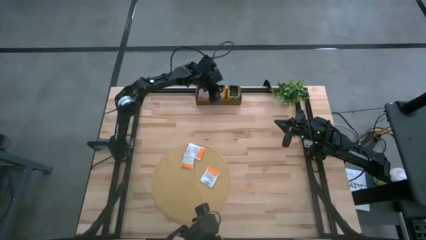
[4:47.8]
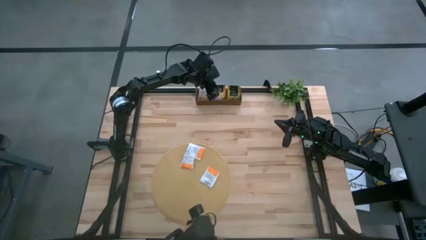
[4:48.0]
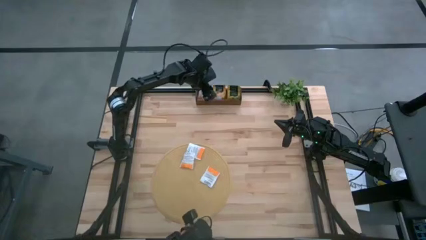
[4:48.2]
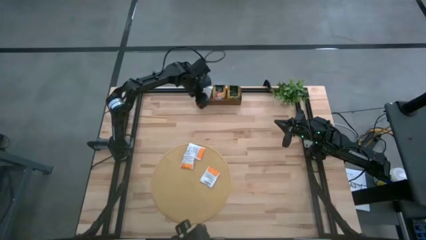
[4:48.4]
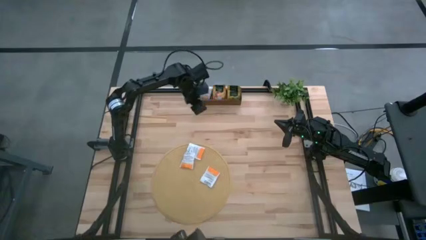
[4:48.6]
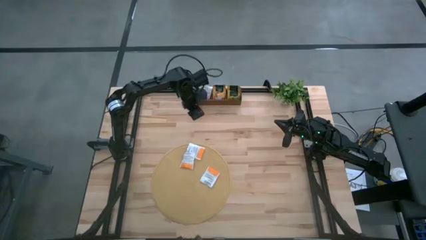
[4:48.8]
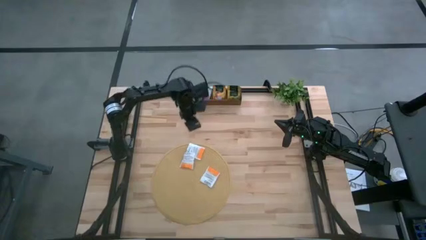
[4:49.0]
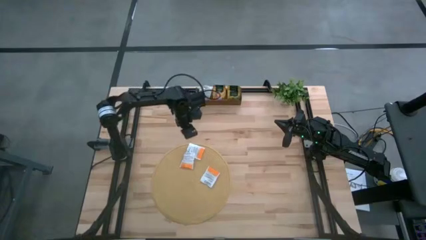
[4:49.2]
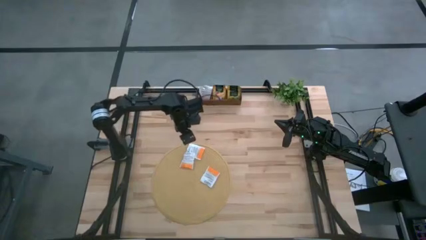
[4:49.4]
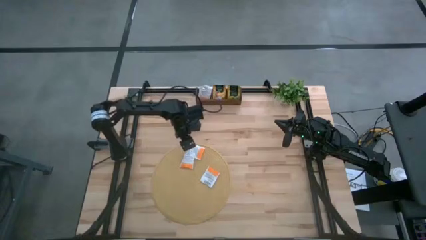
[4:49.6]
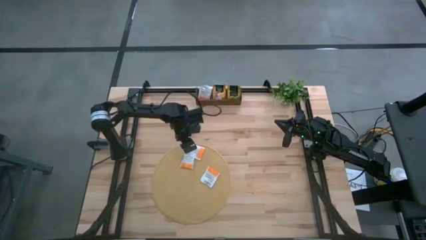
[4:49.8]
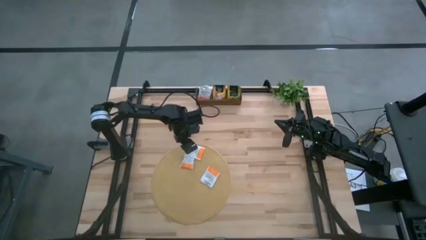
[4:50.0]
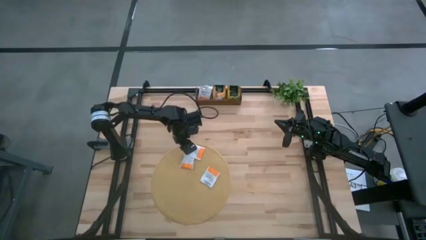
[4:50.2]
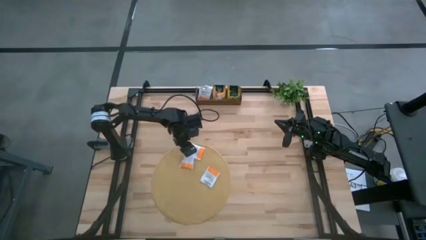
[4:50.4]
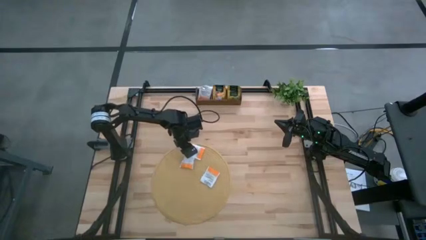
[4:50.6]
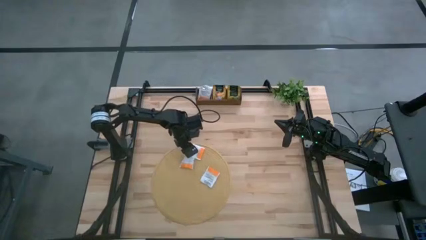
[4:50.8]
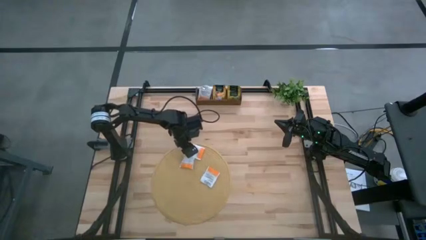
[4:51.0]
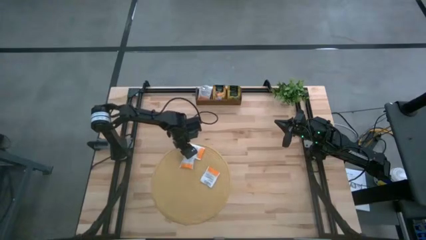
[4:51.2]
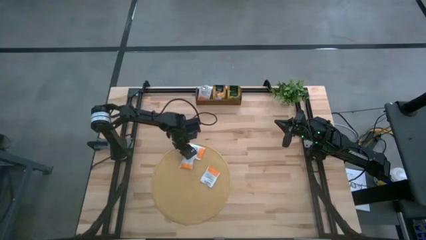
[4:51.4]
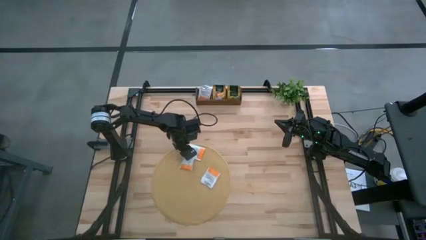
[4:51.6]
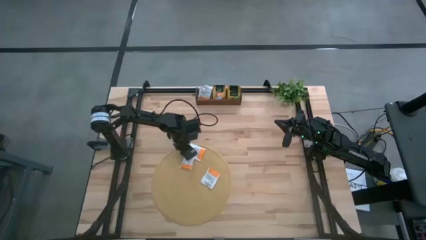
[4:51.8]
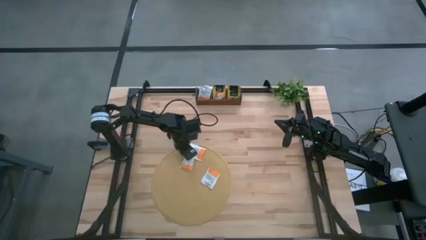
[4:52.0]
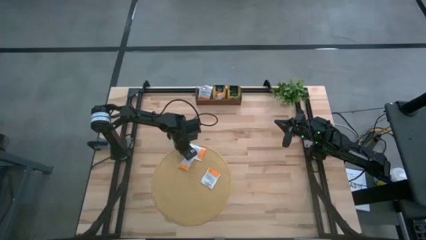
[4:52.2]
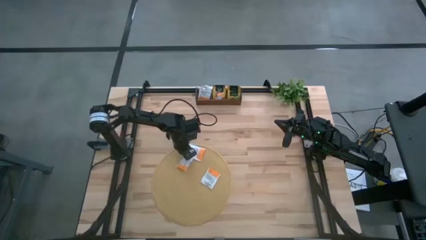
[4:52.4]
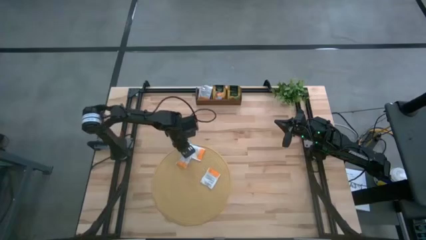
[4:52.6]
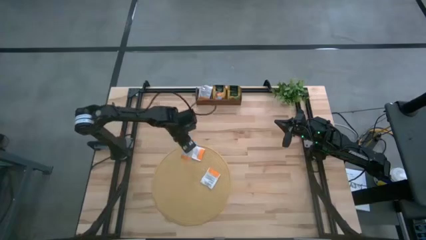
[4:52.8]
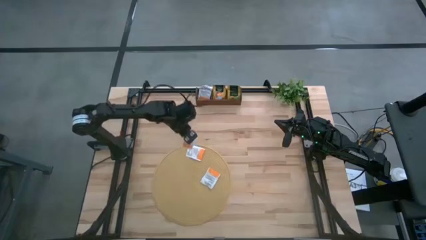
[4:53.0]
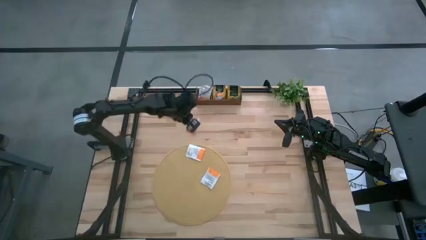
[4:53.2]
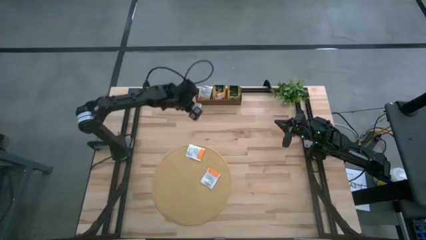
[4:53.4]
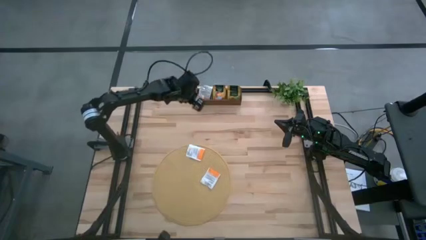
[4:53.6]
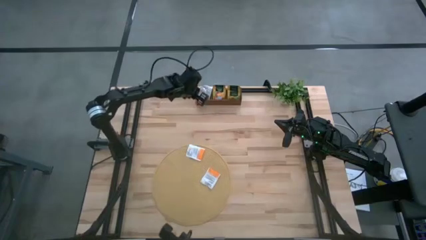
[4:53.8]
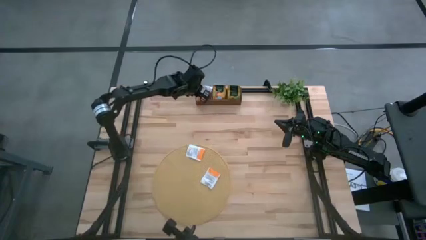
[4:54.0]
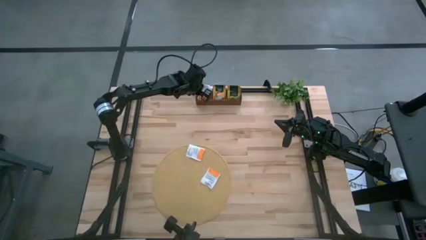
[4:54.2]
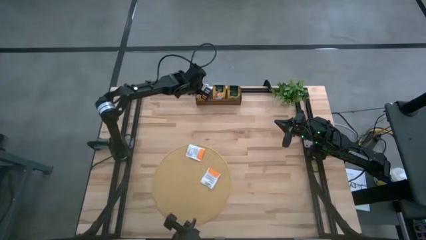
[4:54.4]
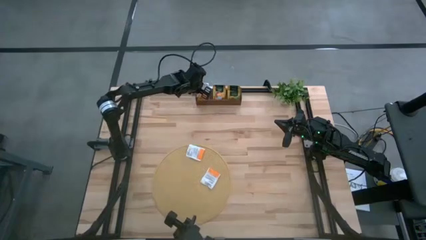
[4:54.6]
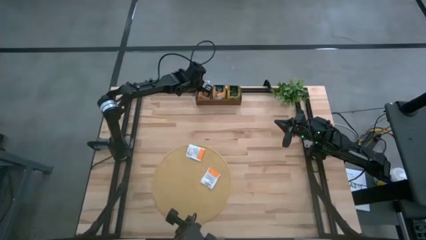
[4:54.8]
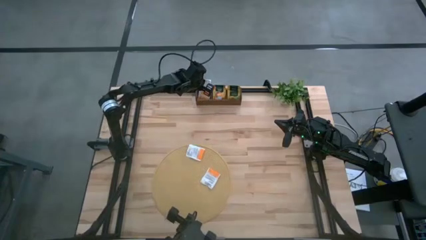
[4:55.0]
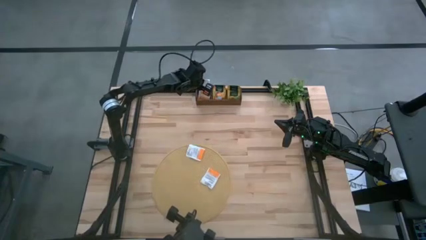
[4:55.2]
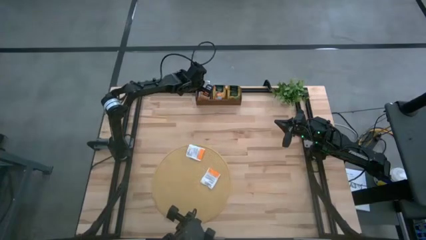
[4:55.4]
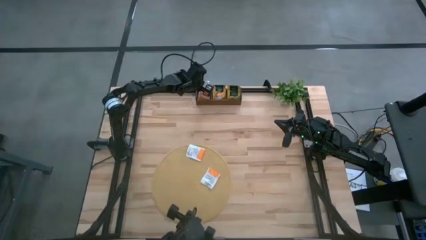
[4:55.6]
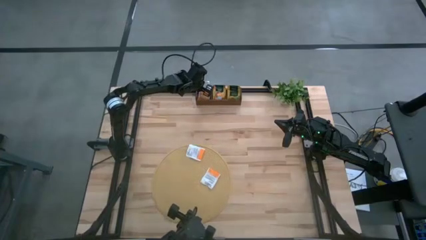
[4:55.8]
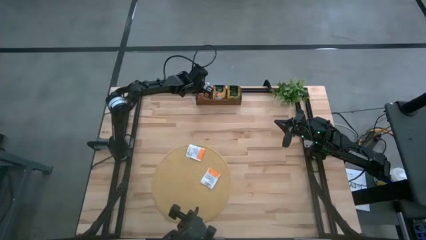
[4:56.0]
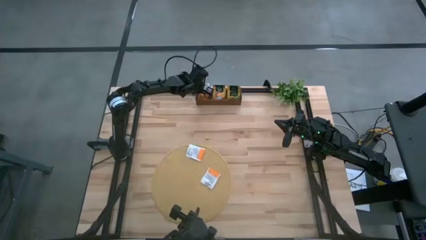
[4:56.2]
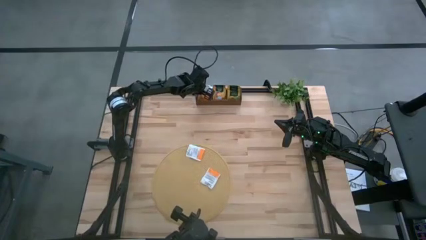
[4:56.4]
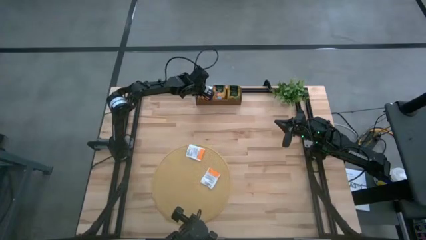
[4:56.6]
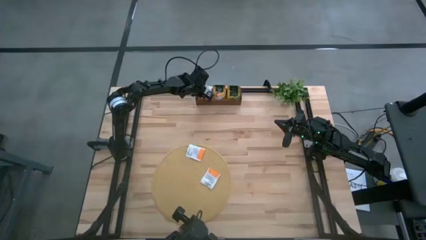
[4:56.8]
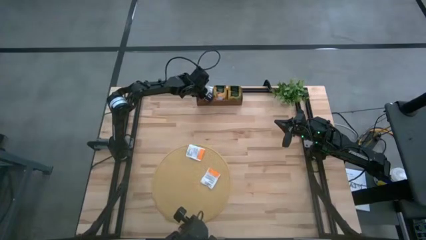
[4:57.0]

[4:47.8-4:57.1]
Task: Pick & Place Tea
Put the left white tea bag into the left slot of the wooden organizer

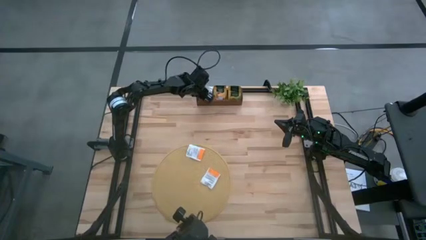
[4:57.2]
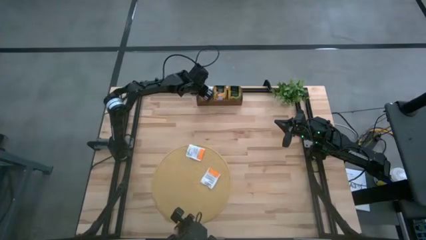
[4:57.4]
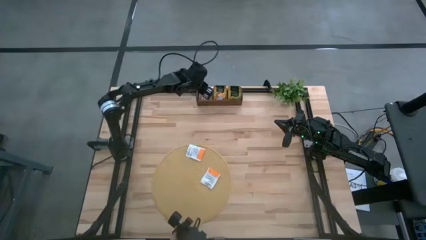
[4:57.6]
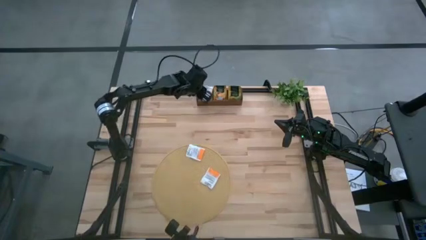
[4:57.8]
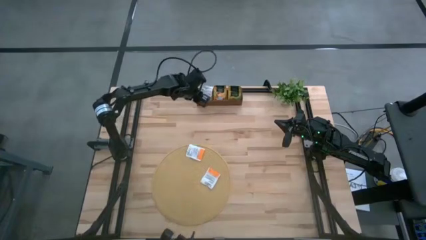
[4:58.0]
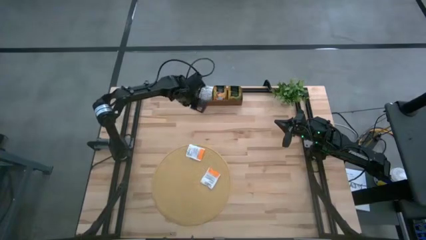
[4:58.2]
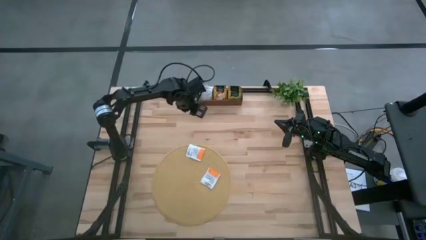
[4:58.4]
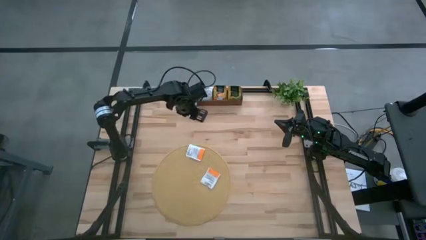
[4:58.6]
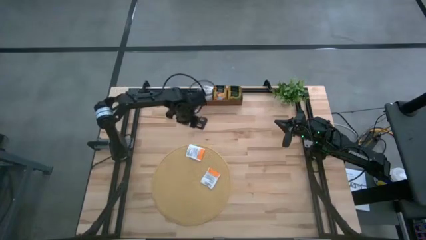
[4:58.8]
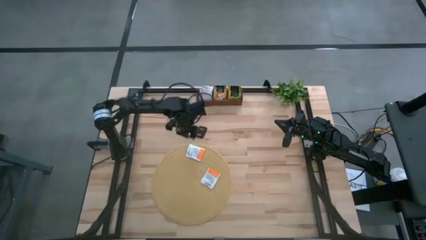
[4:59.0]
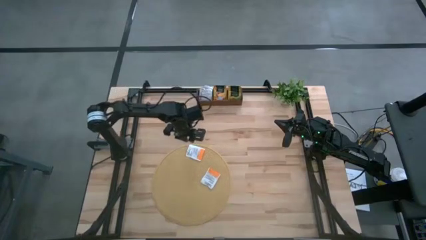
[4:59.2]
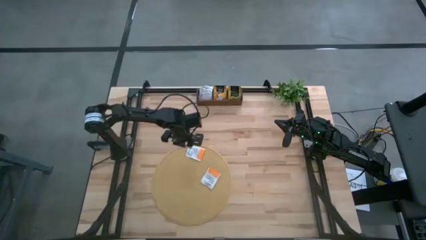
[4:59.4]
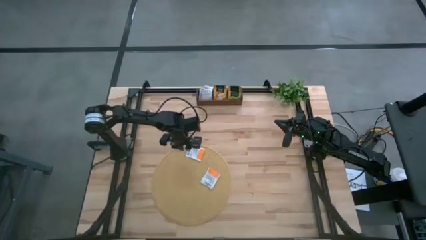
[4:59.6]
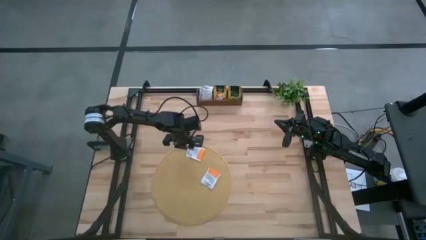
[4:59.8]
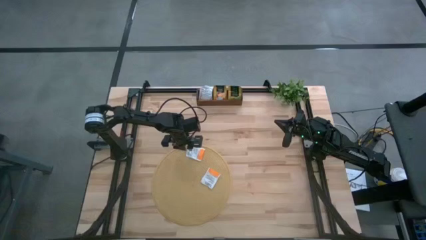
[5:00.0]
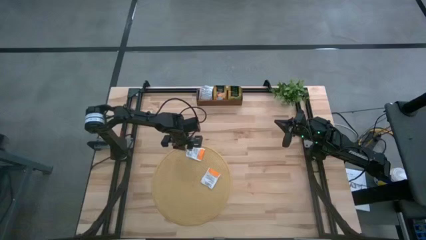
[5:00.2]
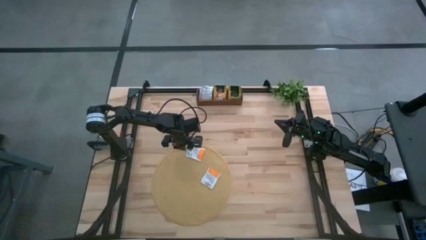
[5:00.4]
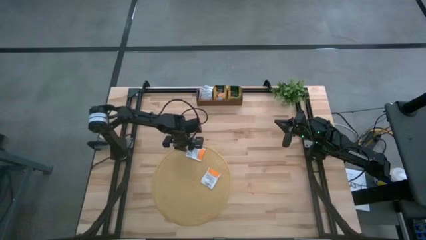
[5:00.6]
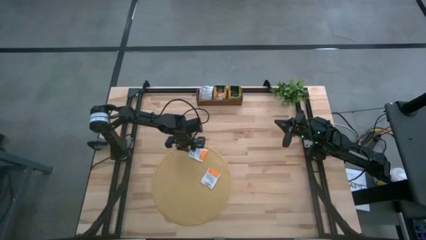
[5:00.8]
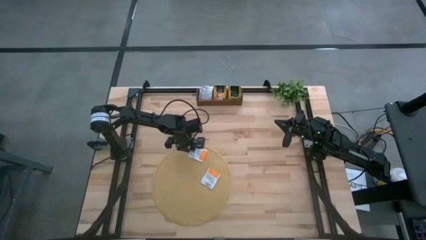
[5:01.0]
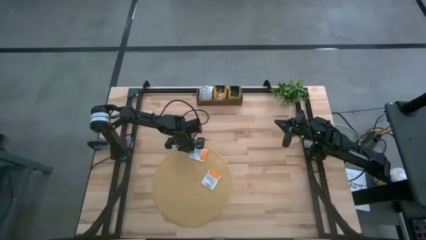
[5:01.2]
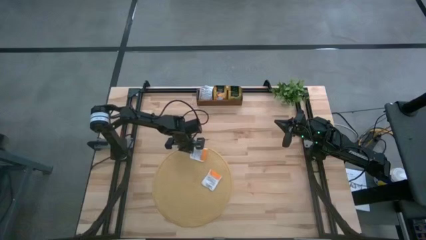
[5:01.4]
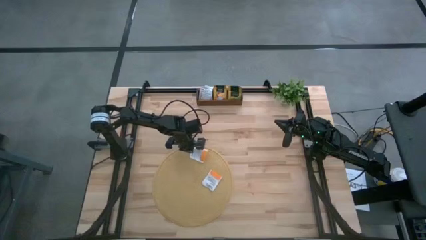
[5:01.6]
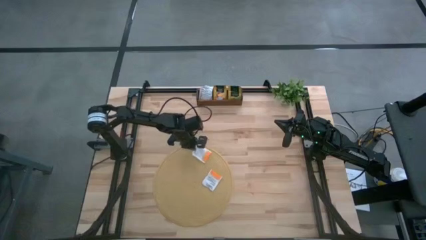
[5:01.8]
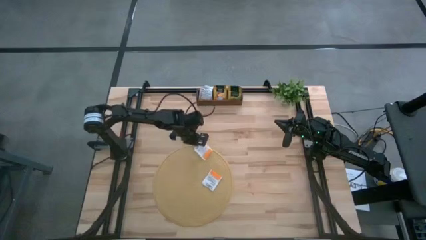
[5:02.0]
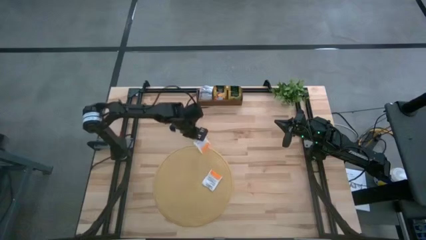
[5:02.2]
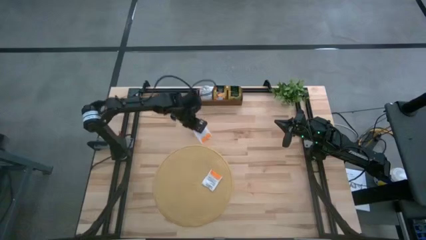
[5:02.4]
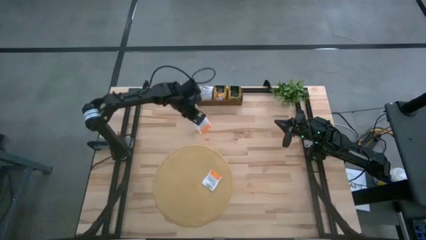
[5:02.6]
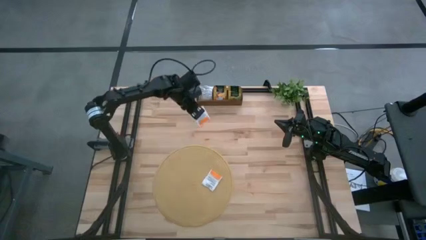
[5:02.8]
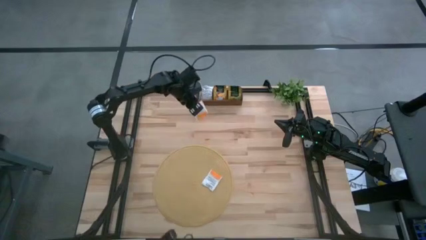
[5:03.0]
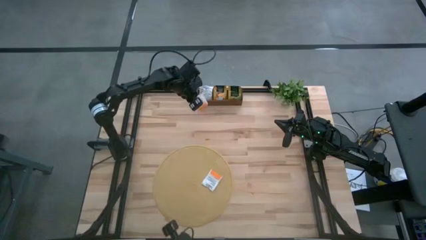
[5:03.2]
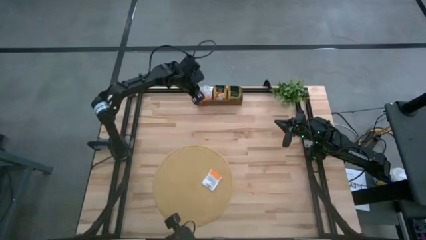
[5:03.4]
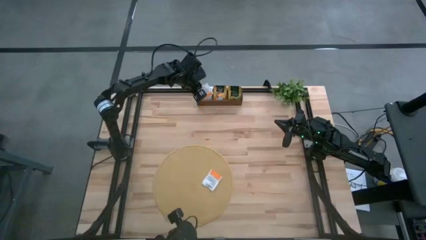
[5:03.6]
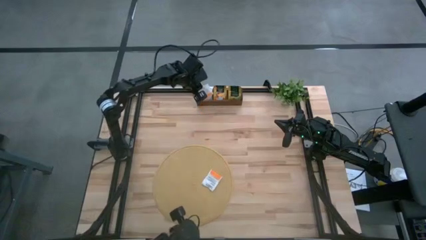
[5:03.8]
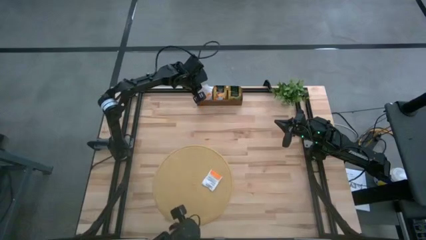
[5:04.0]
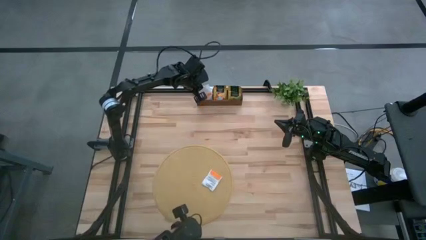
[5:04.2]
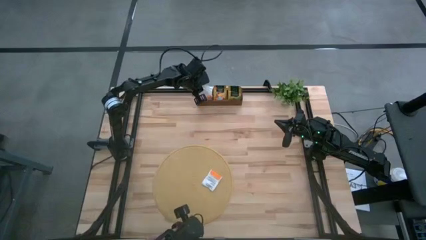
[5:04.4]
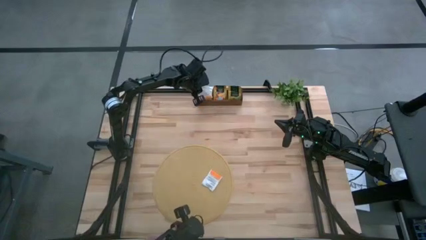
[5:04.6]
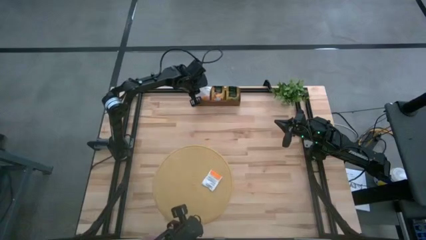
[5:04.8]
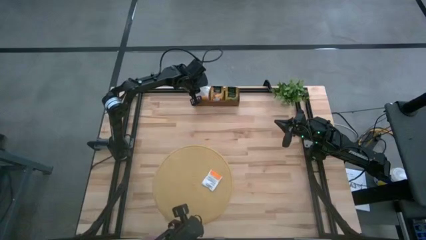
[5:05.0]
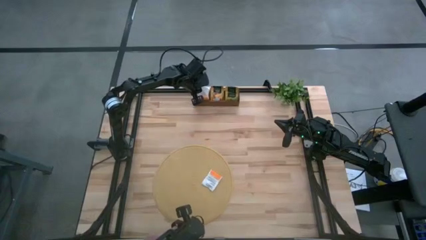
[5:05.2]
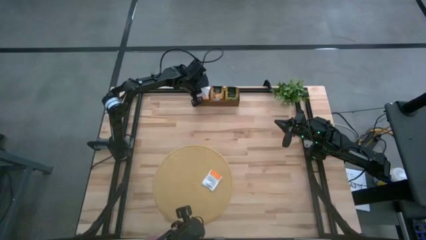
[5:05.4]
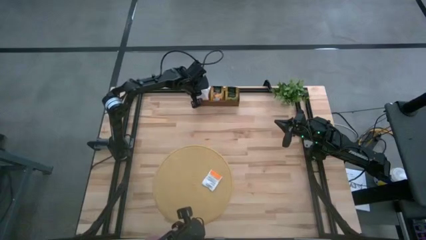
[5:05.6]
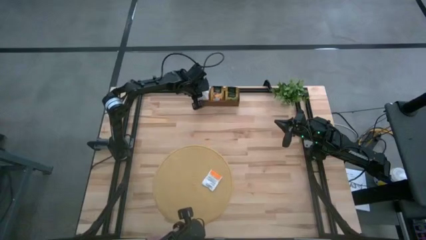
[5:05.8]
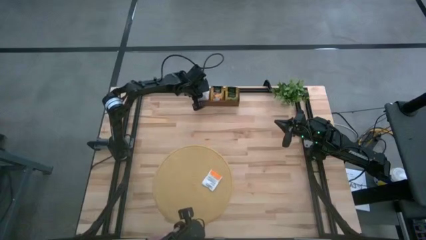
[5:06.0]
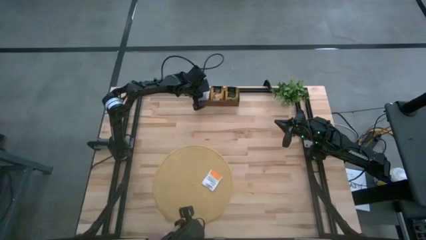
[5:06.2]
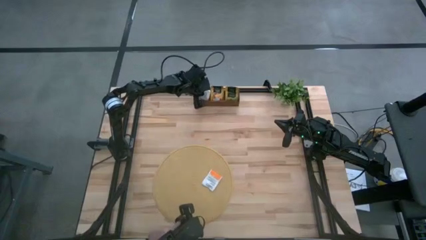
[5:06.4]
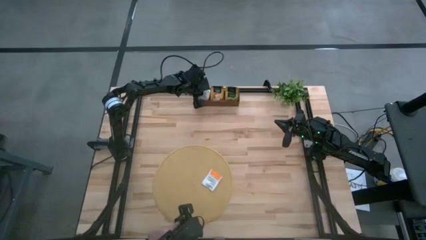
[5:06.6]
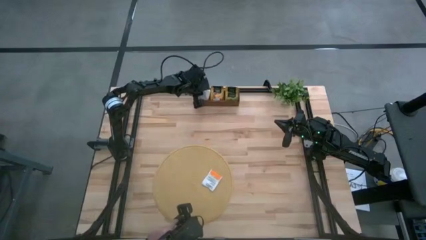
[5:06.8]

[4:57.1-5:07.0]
Put the top white tea bag into the left slot of the wooden organizer
